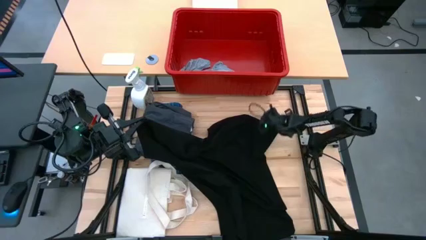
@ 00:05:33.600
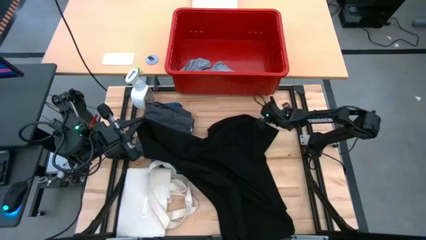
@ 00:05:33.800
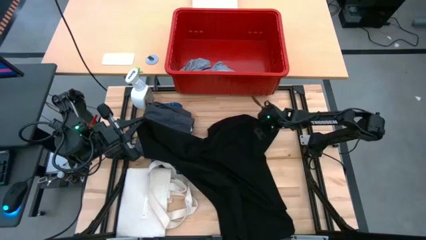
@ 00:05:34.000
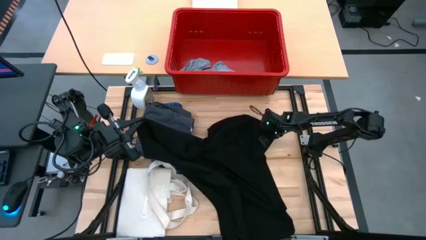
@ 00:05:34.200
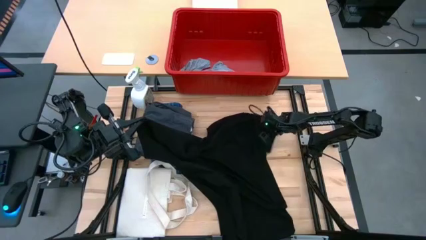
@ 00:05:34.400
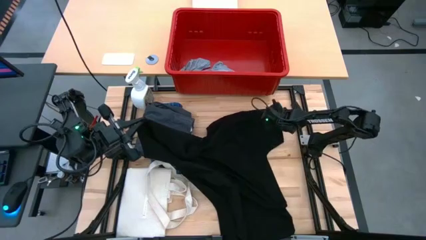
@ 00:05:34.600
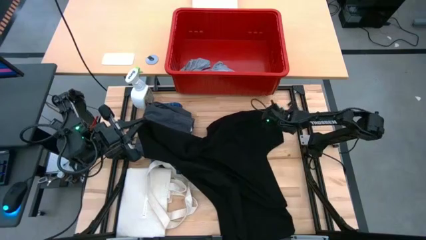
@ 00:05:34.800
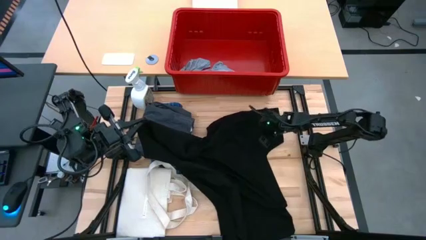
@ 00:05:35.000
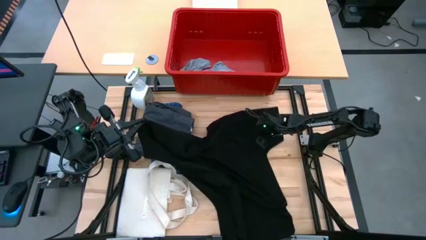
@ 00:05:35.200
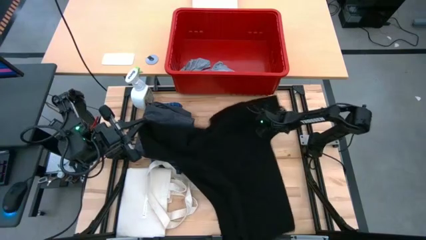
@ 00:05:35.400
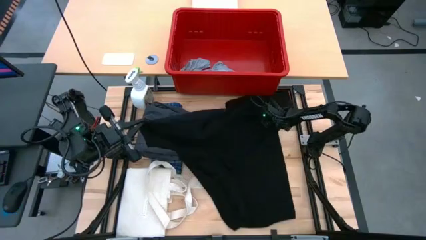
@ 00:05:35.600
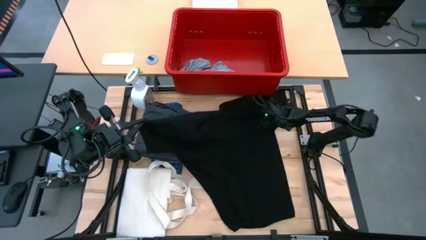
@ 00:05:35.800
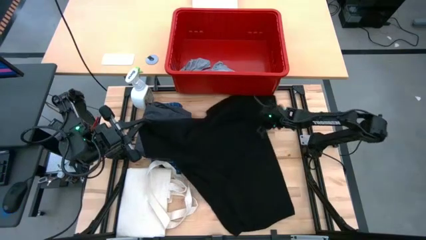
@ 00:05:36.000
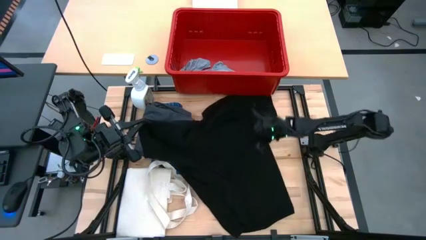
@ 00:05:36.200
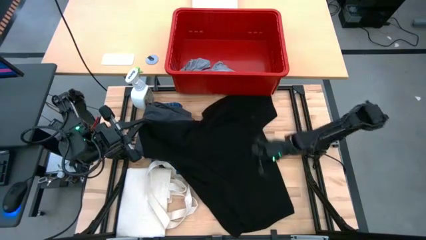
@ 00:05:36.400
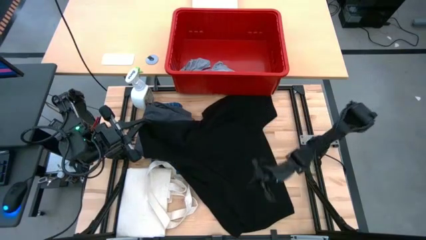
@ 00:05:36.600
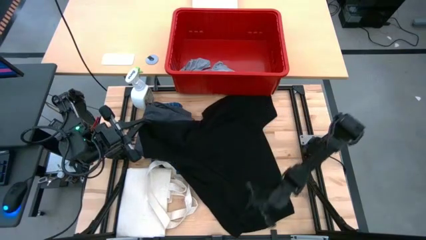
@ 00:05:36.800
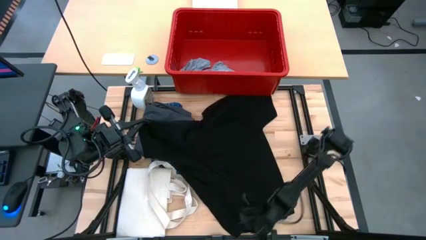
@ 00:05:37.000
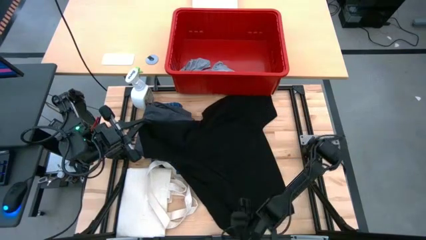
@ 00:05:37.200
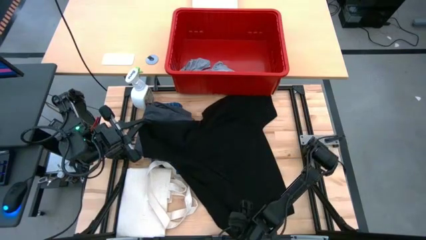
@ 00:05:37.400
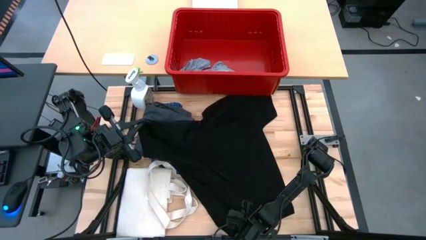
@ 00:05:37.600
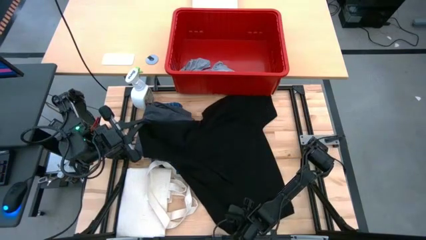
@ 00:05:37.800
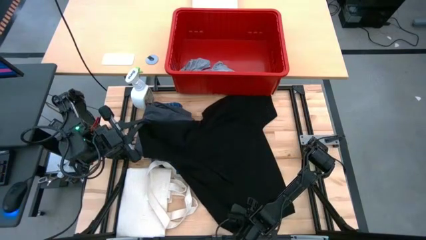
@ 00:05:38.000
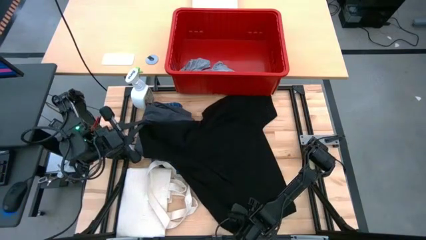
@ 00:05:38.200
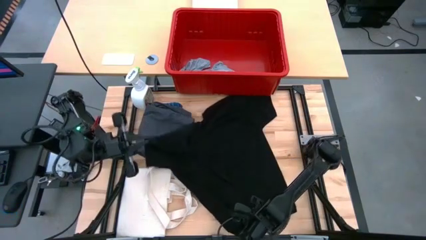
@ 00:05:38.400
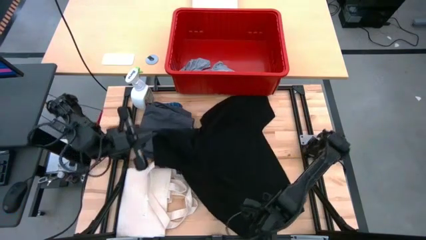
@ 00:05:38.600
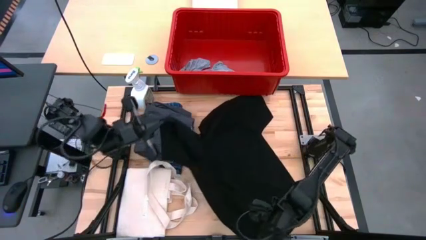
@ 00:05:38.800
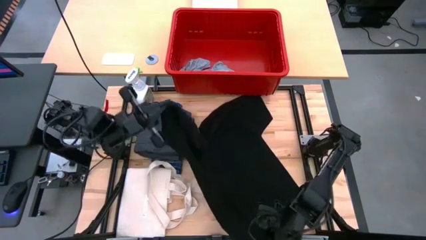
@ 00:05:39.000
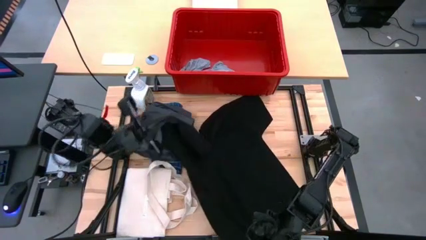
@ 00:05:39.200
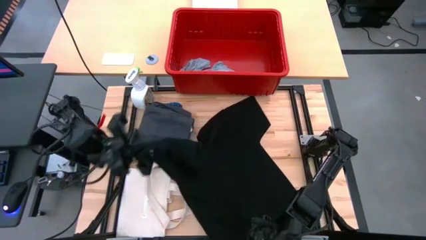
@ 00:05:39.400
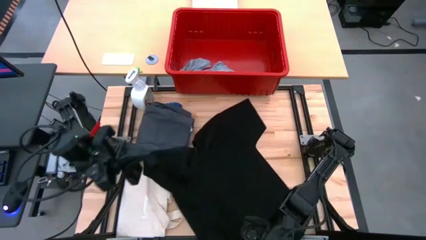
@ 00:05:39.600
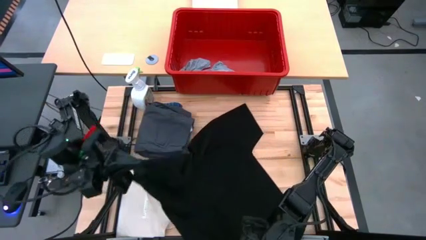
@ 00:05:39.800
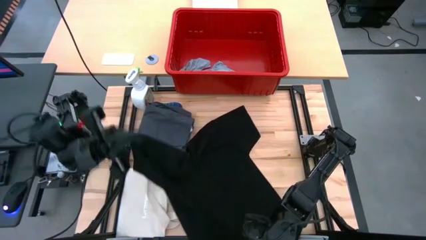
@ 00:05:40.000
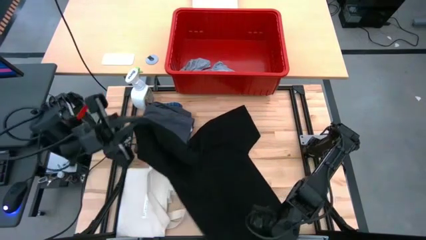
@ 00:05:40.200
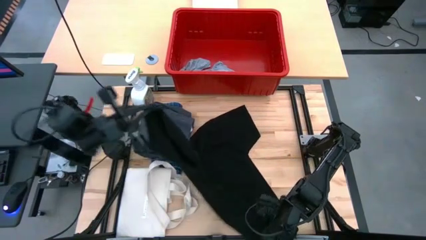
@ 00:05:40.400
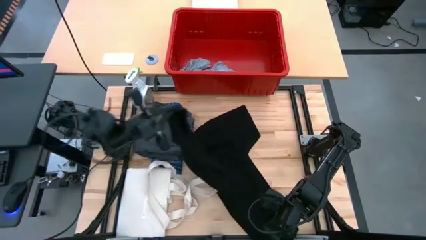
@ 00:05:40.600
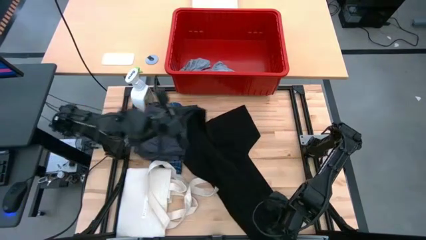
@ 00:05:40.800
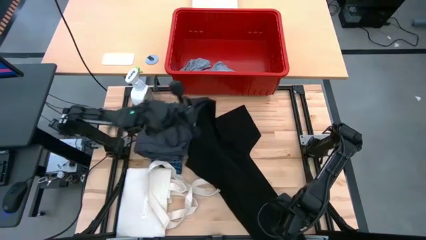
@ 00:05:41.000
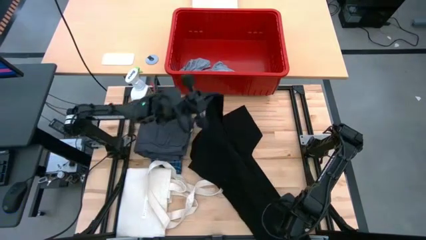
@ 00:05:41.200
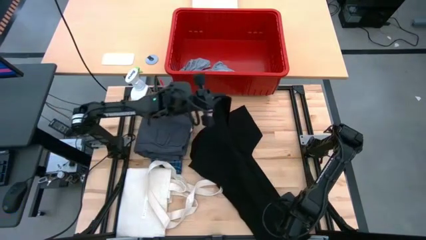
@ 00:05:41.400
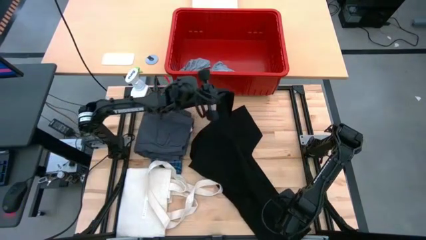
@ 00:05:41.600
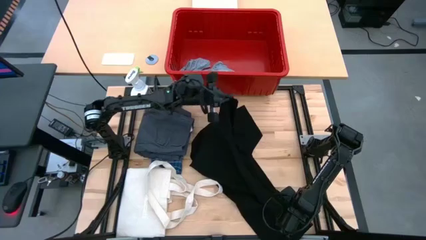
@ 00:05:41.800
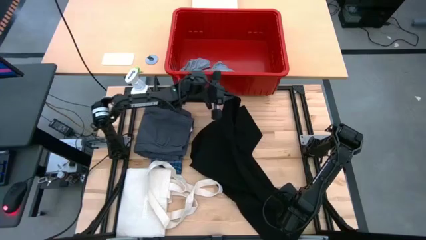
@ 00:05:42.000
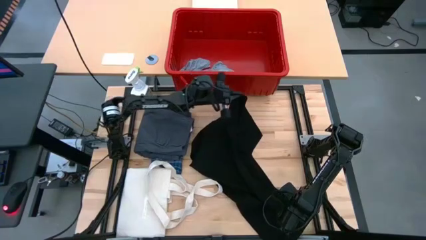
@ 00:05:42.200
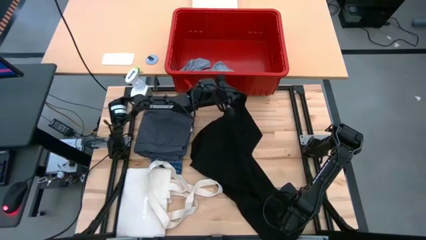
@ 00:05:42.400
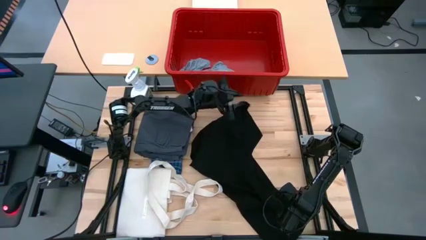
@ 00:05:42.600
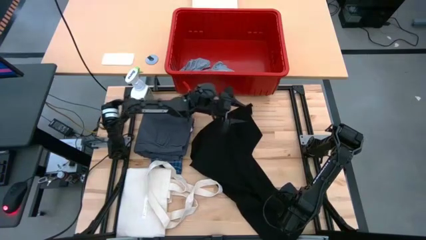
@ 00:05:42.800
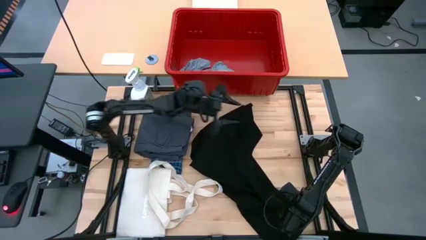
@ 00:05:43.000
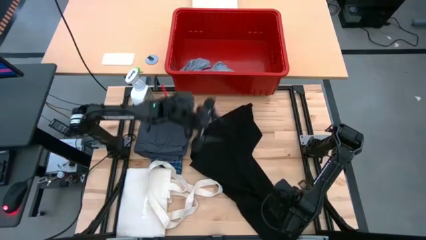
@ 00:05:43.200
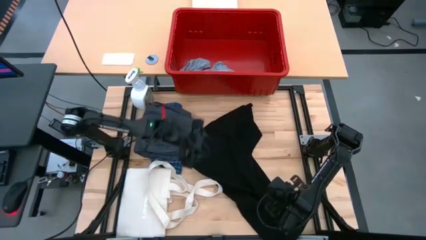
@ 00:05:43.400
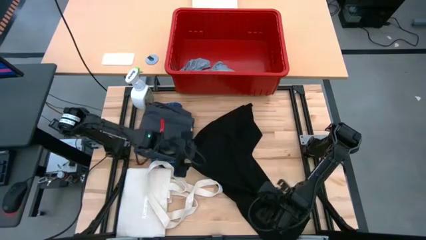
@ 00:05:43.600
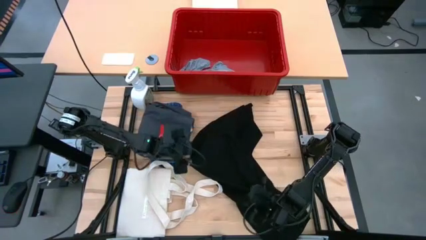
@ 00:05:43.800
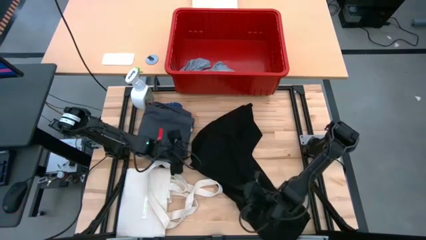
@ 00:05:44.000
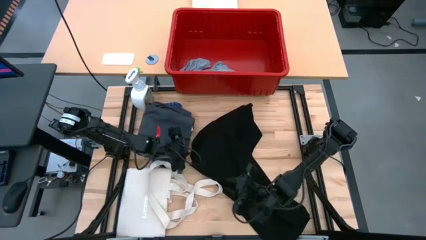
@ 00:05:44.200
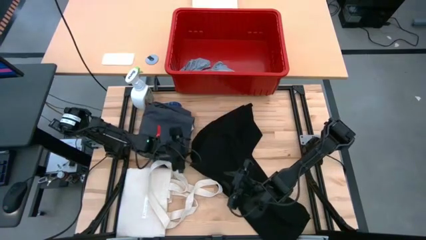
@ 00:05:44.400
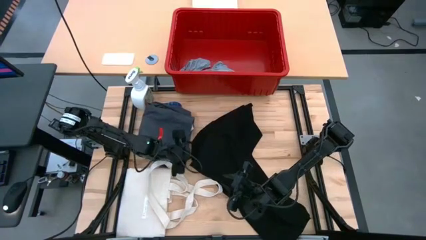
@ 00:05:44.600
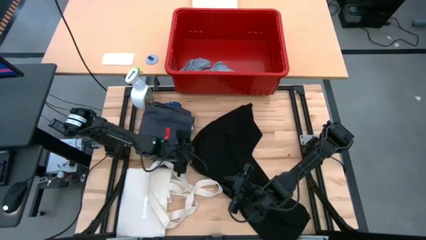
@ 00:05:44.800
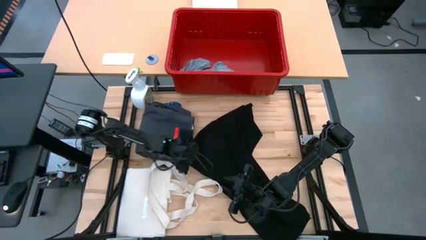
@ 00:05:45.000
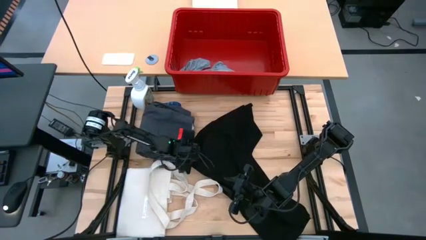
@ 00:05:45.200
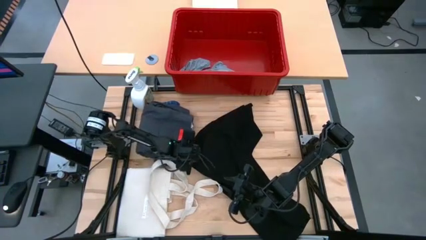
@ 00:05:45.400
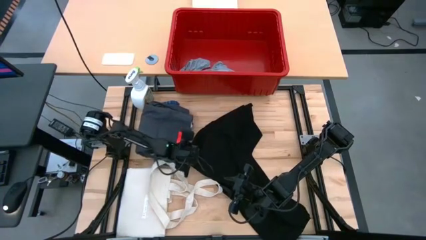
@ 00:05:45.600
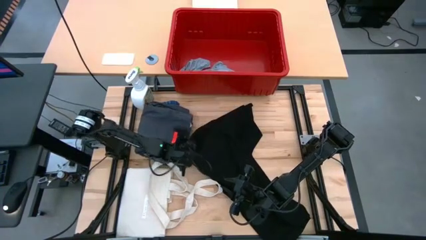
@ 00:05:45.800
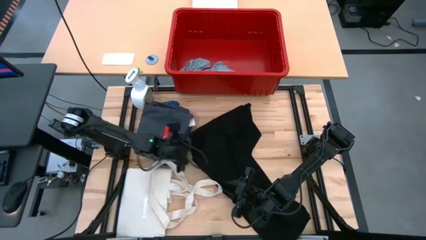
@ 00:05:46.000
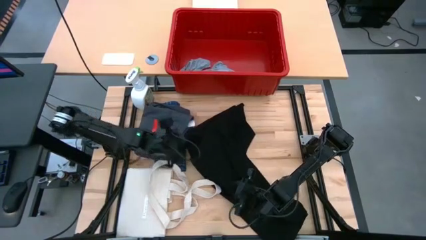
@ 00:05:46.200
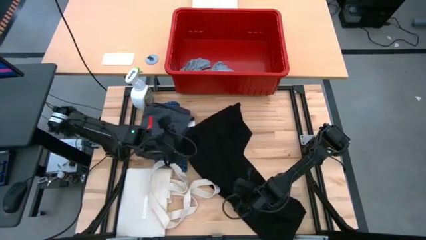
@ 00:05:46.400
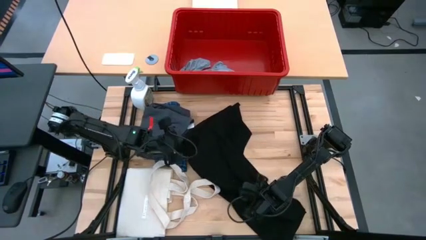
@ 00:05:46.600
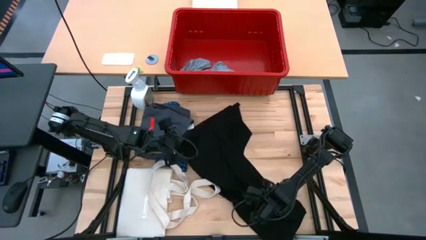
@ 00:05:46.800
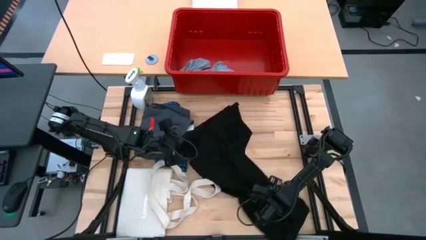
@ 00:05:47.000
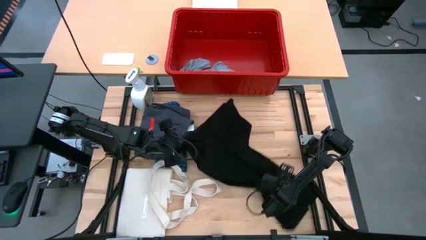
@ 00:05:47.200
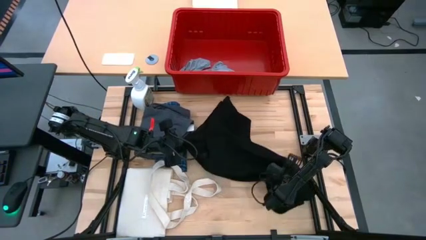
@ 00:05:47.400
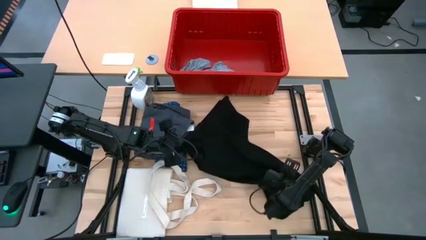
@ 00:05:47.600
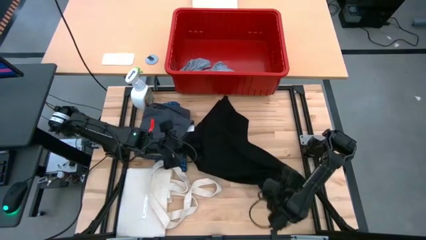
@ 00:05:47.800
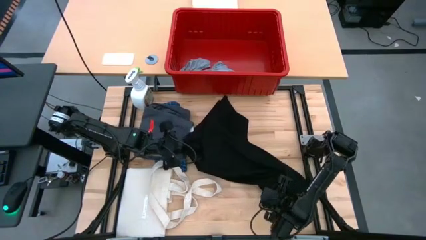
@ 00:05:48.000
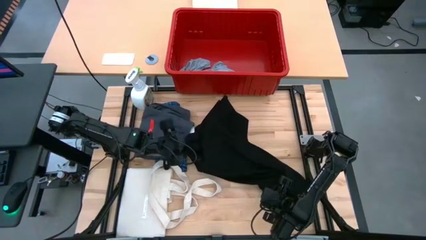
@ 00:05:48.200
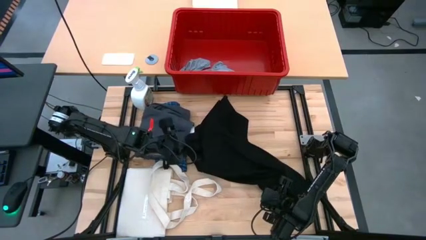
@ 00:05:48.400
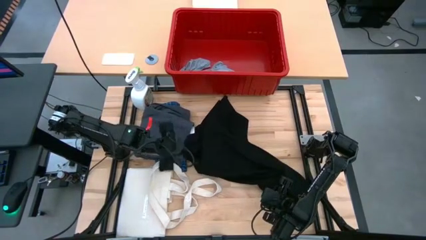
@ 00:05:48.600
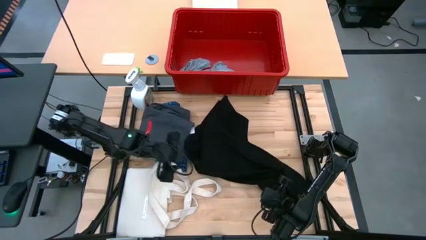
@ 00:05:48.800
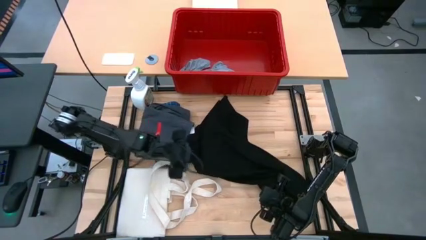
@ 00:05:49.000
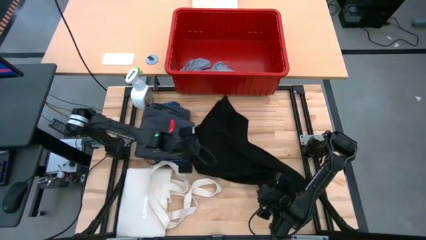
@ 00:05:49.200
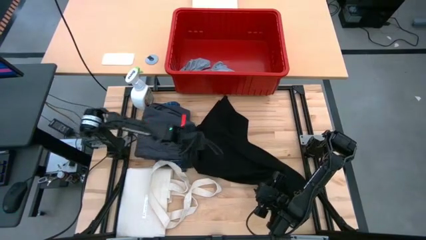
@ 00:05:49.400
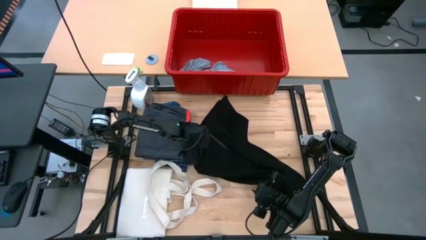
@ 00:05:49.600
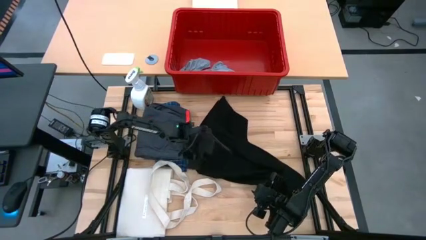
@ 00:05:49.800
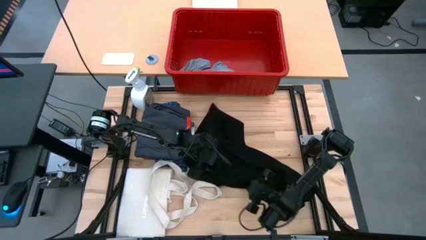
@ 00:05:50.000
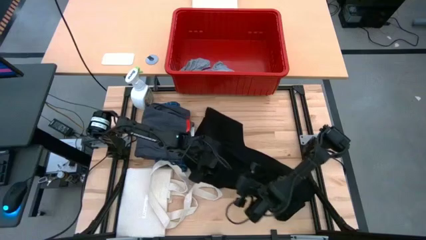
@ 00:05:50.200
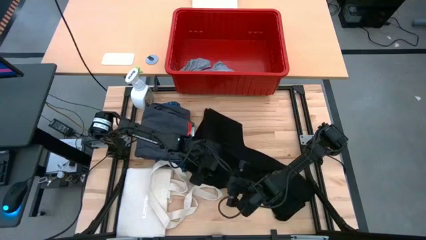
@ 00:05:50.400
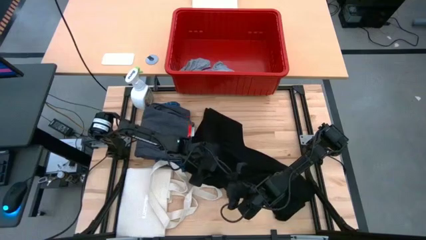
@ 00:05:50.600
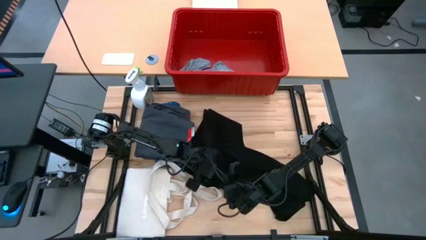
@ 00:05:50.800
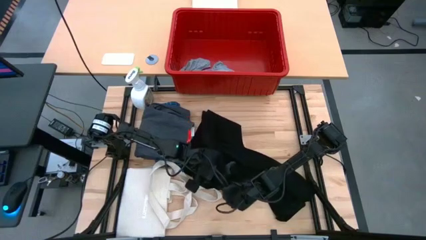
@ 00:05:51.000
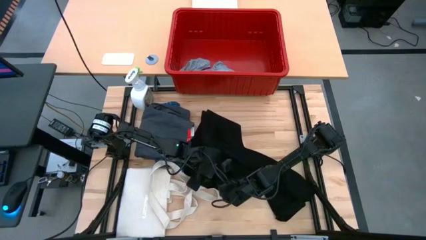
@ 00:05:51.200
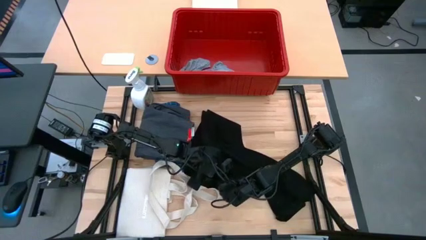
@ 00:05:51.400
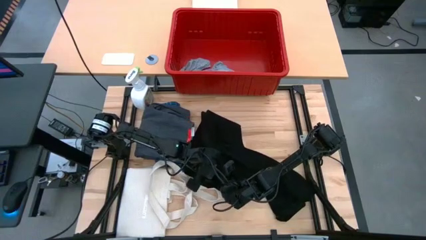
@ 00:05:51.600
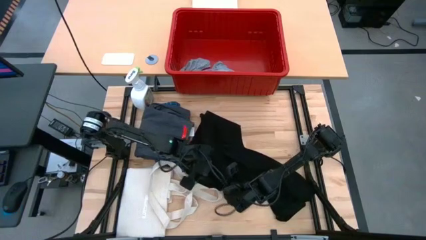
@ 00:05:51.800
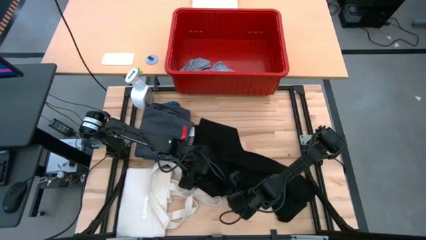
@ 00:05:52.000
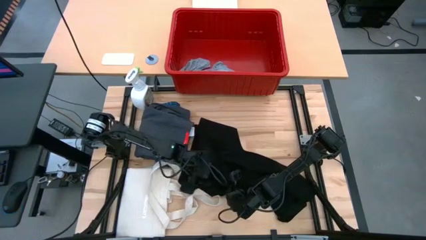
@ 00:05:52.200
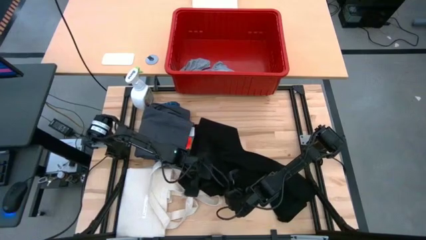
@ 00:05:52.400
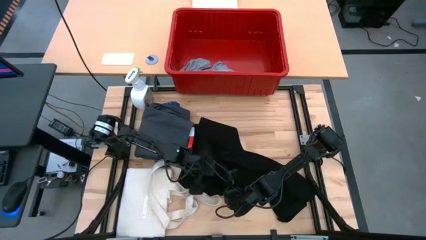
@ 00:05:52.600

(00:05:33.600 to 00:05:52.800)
Task: Fold Laundry from Bin
Fold the black shirt
